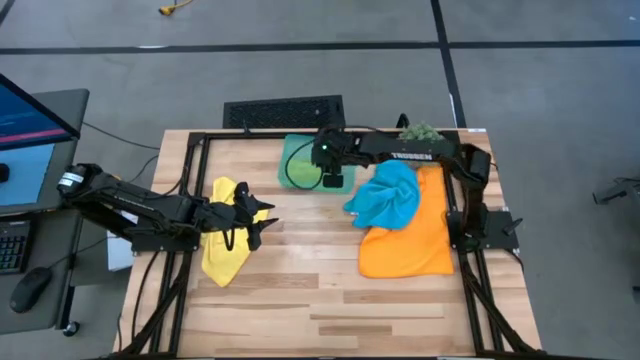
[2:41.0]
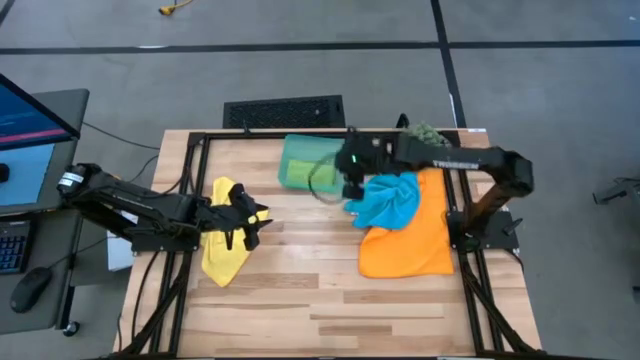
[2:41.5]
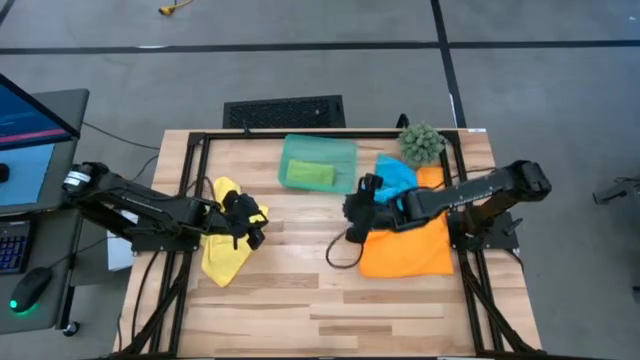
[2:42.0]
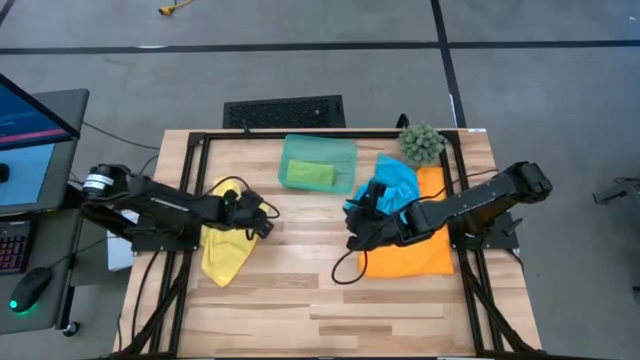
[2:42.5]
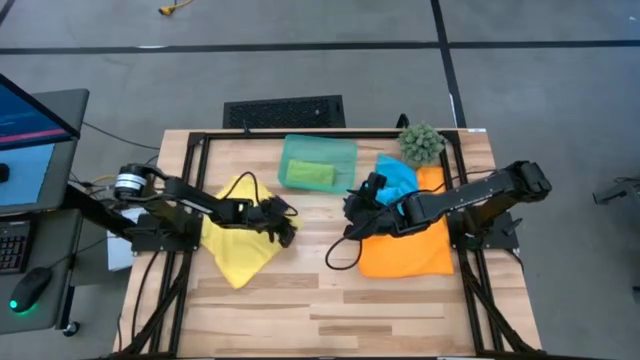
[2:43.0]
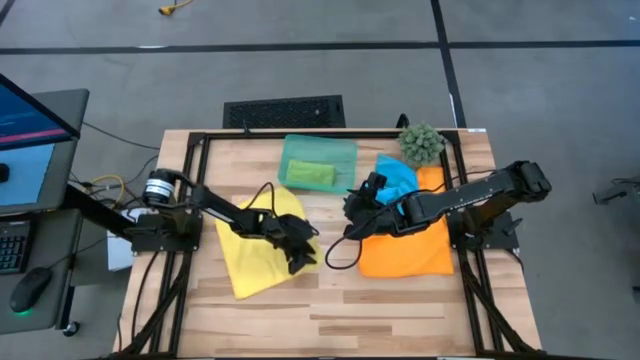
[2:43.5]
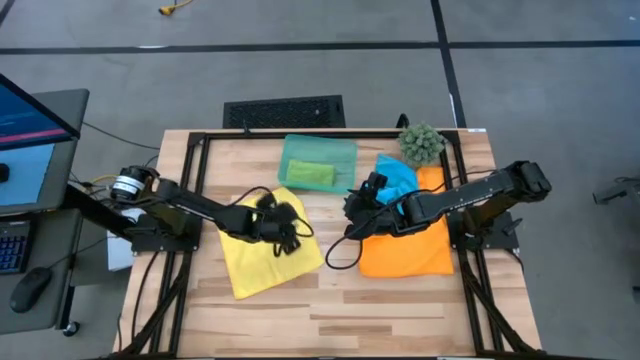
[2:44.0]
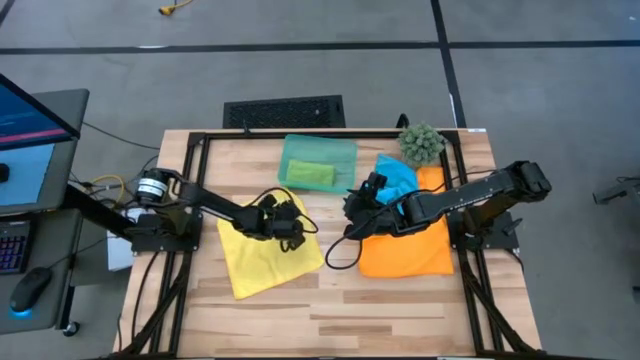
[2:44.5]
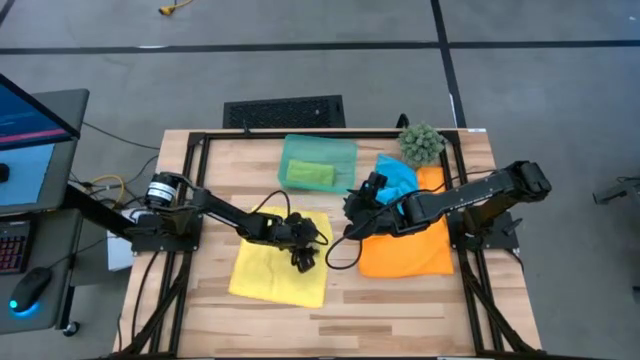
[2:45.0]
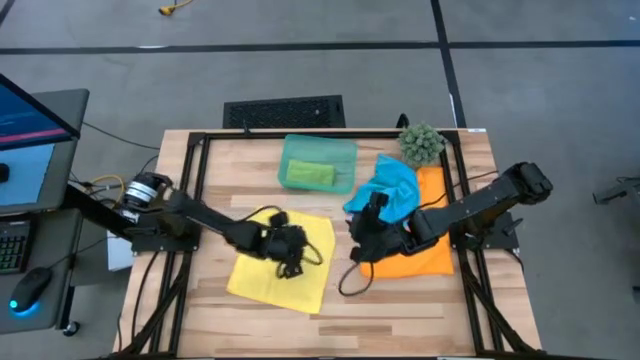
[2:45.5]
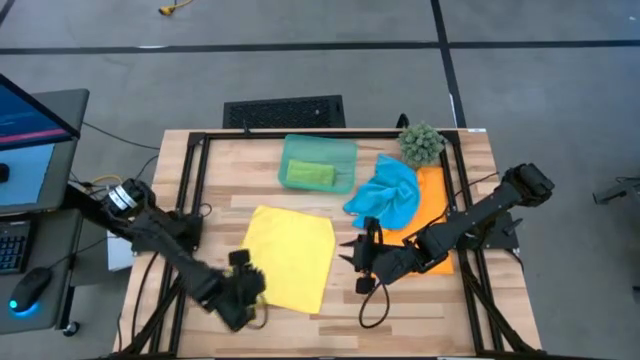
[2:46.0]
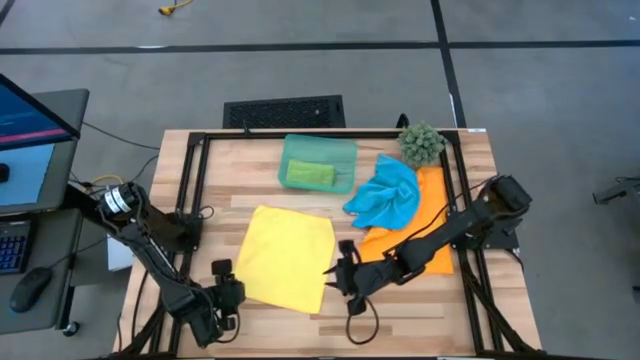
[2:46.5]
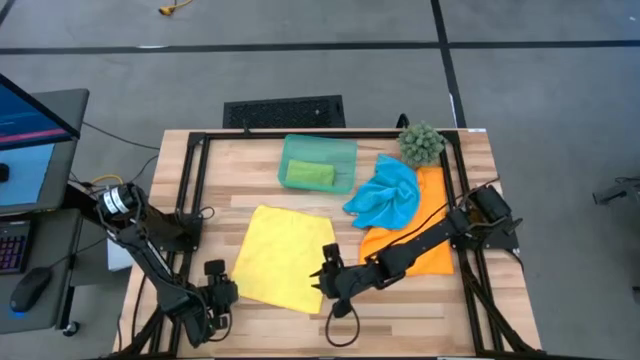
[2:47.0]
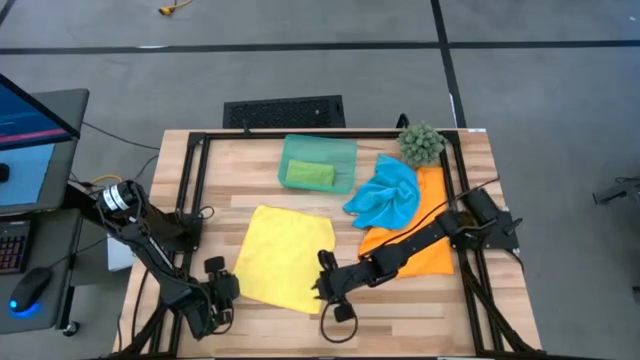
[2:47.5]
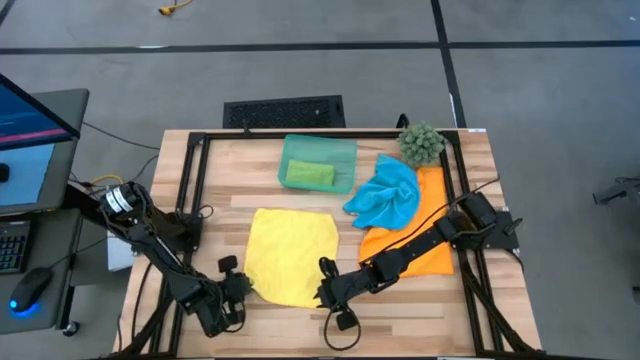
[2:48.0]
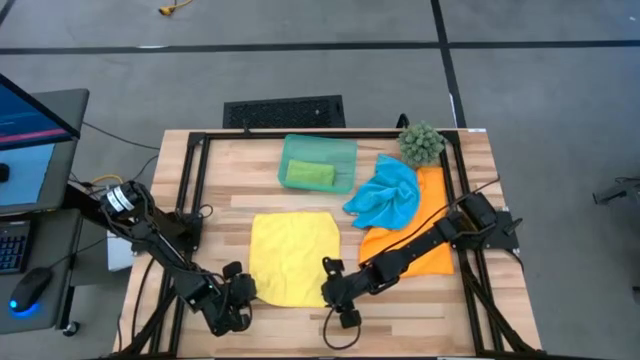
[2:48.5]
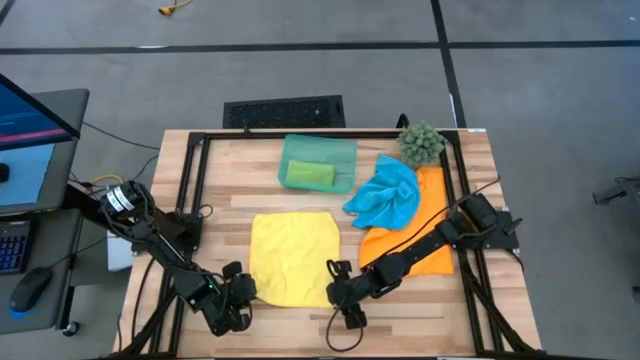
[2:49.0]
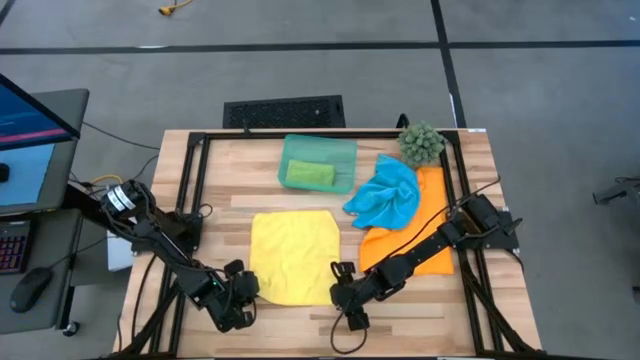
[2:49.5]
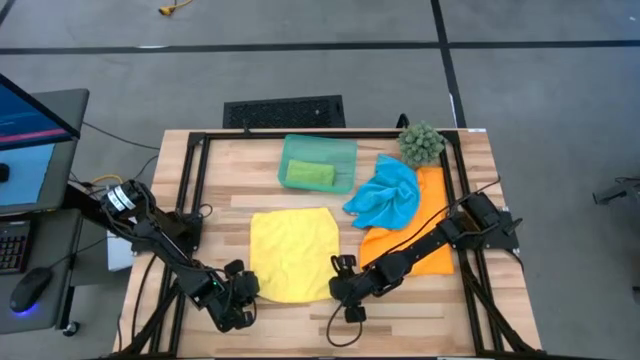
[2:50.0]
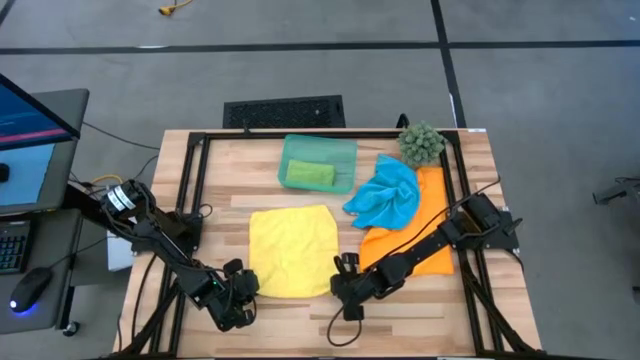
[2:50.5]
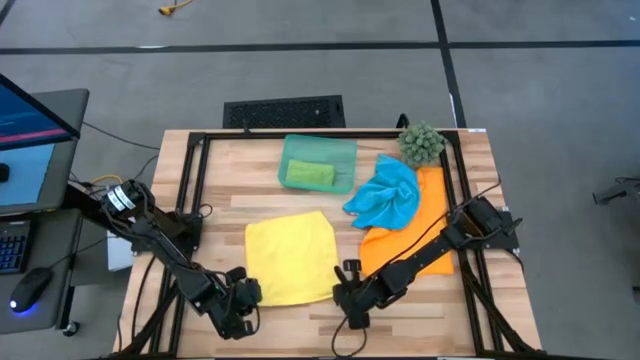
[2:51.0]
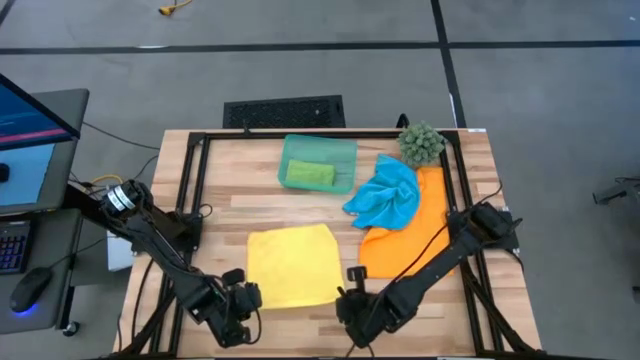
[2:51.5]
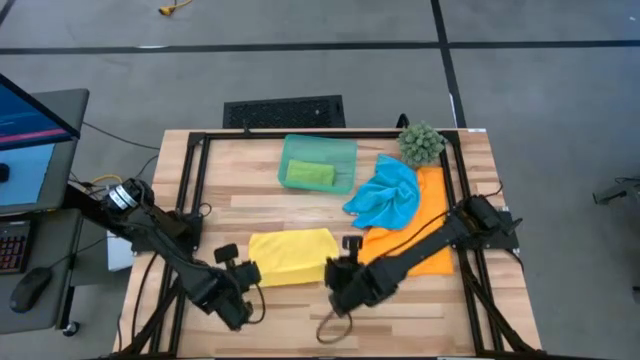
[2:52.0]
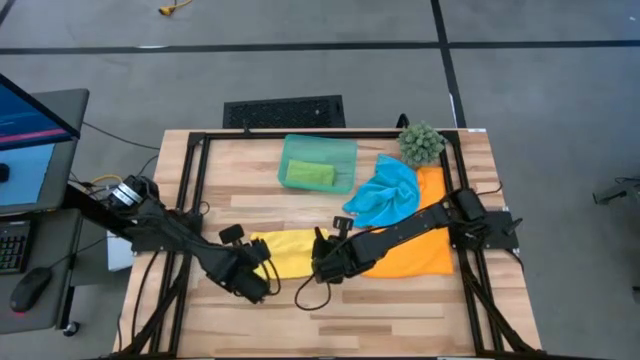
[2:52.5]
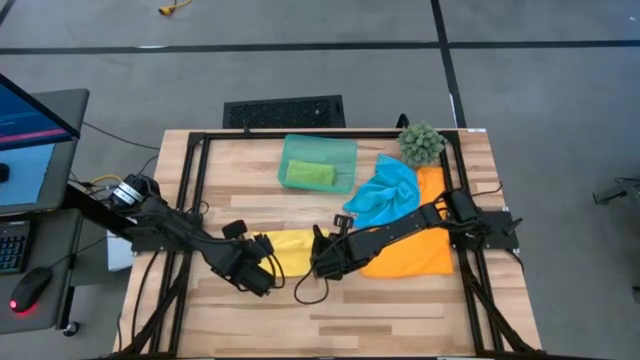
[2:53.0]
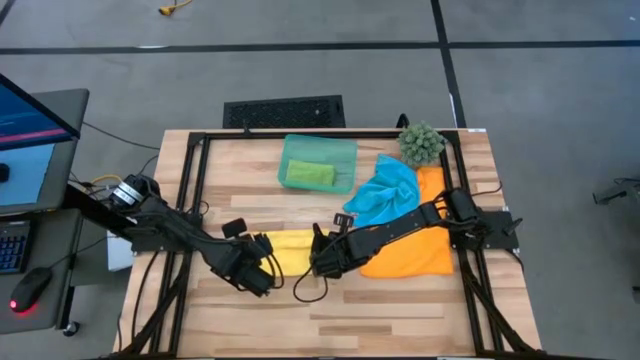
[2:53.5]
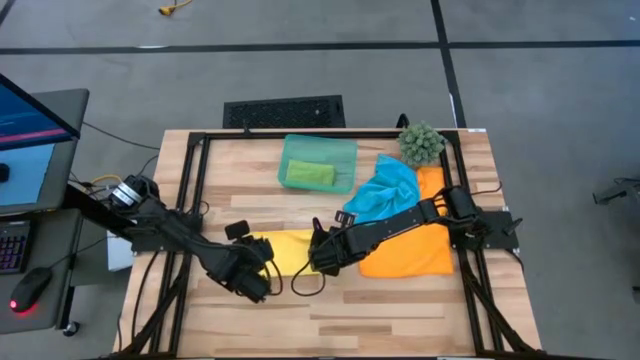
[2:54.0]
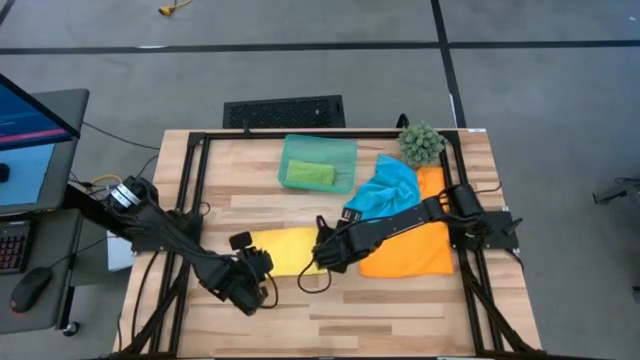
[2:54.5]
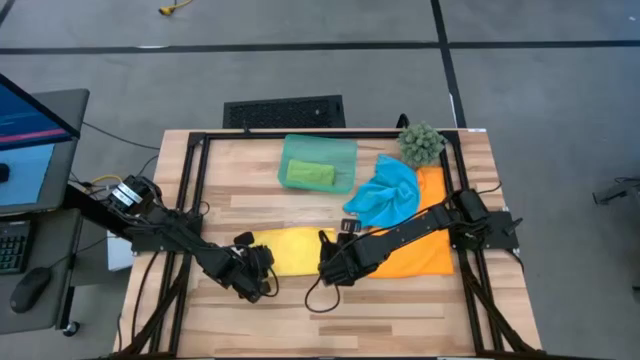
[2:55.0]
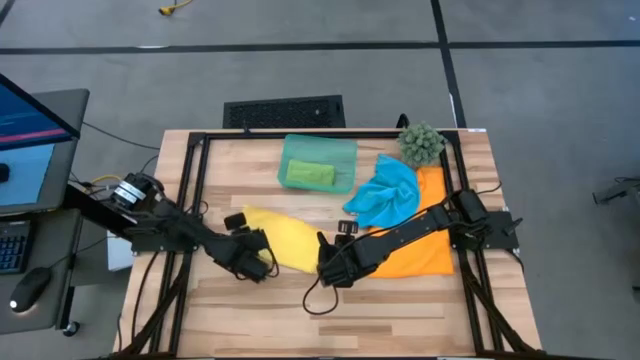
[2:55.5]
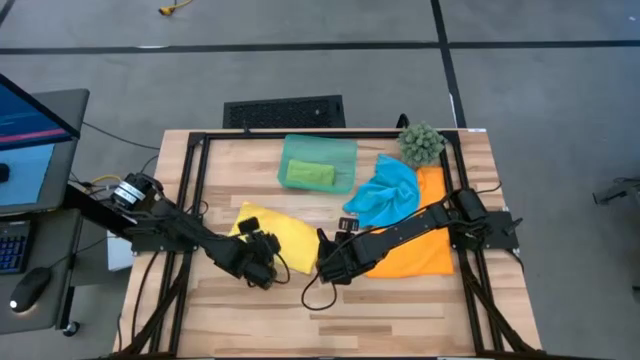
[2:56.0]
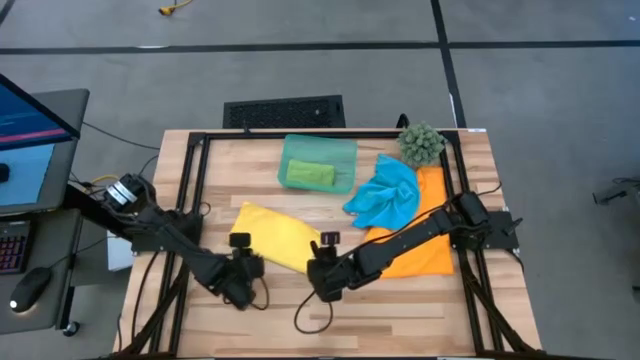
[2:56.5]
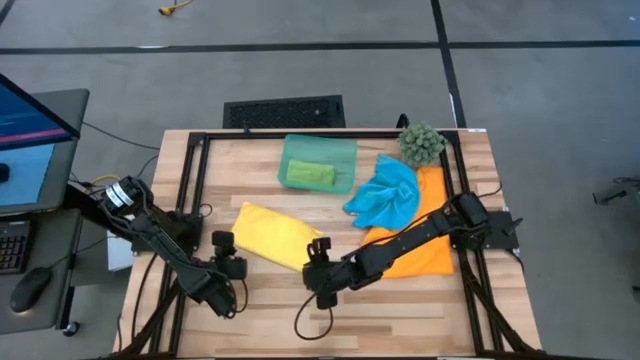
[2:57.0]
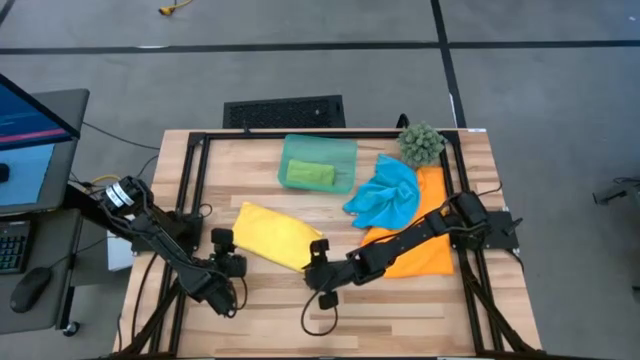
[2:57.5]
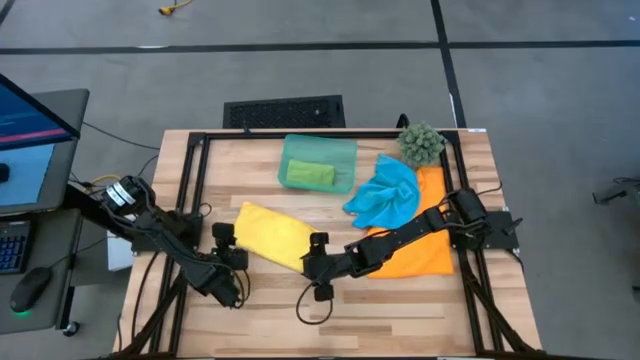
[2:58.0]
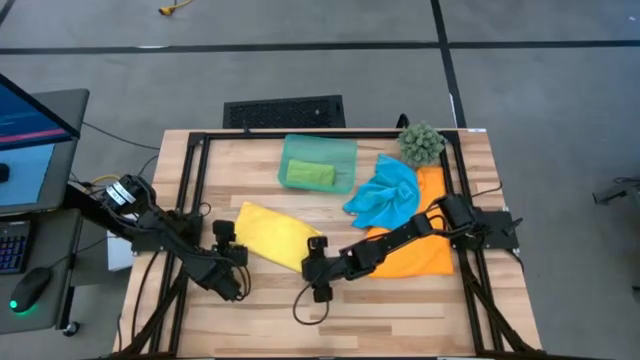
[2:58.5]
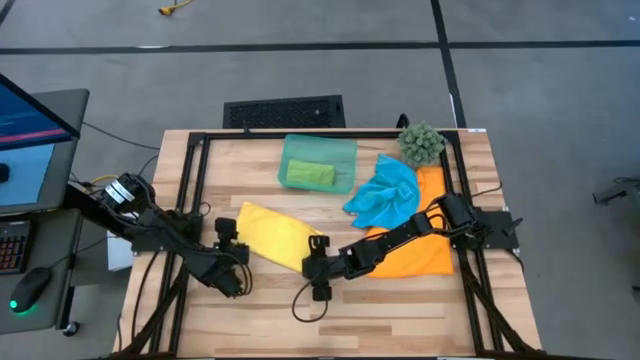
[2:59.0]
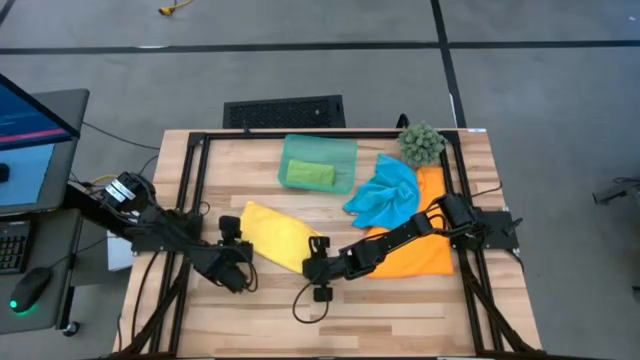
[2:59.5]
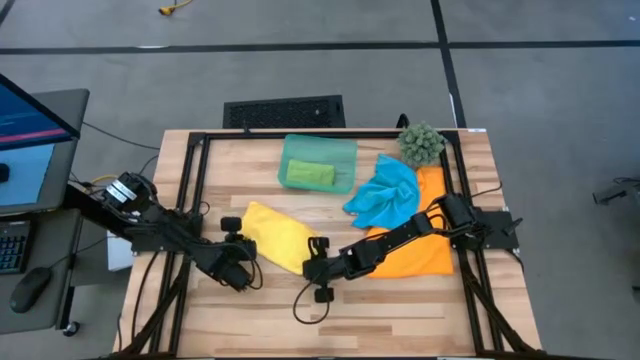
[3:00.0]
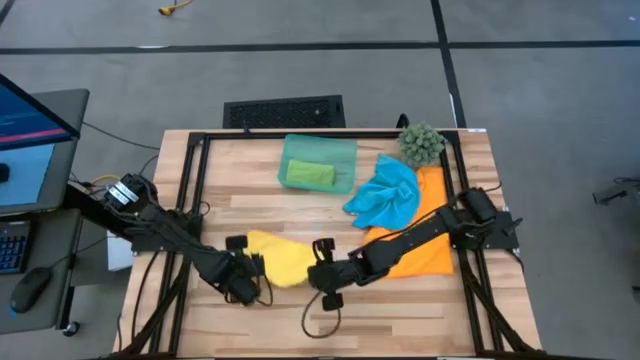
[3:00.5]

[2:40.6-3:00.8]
Task: Roll microfiber towels into tight, uniform cylinder then place into a basket
Roll the yellow microfiber cloth

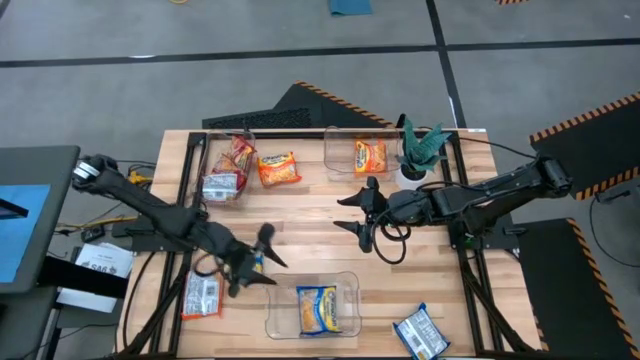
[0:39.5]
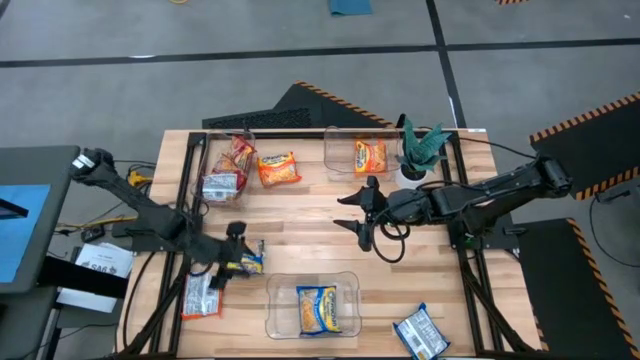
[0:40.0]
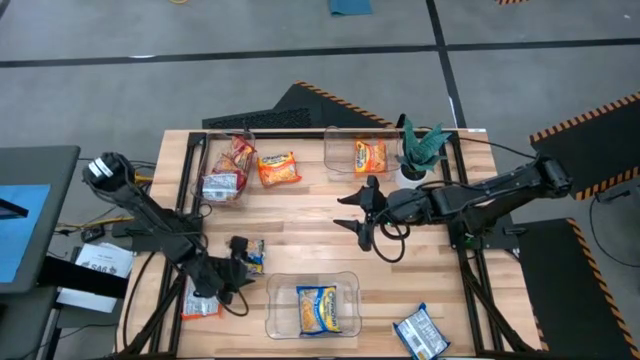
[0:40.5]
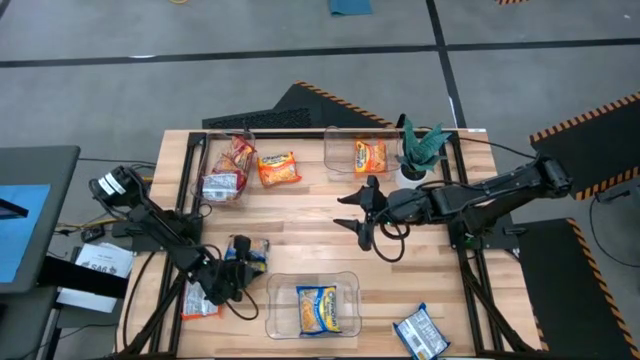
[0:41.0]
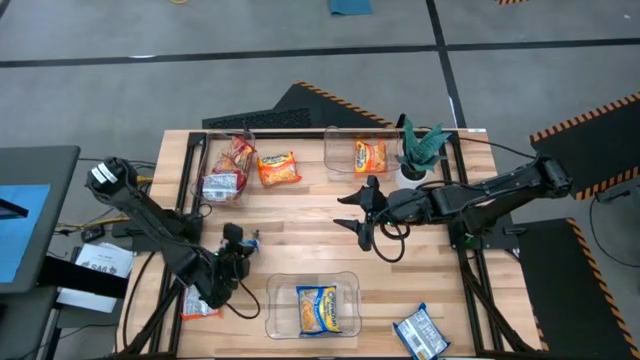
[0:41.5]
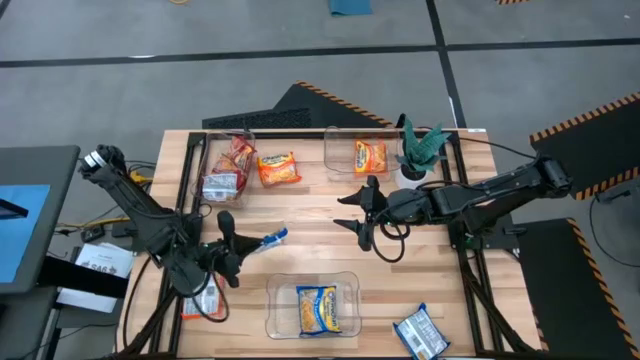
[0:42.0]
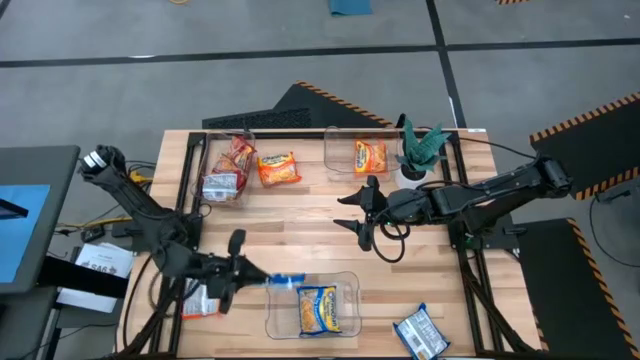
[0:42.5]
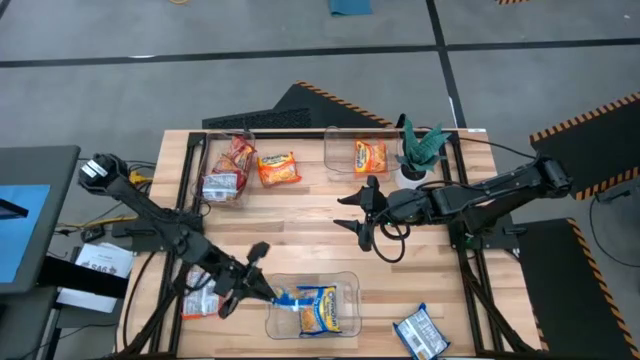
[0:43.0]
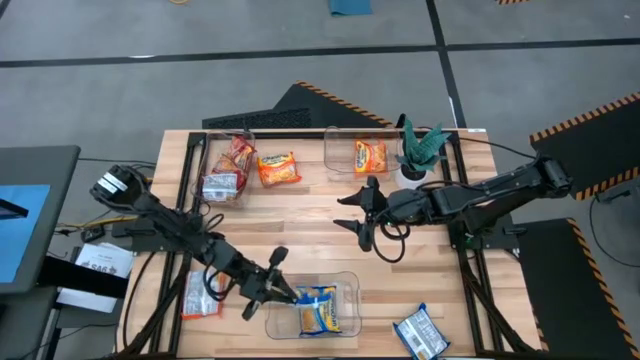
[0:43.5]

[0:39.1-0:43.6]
Task: Sort Maruchan noodles
Put the top blue noodle pack into the bottom transparent bin
